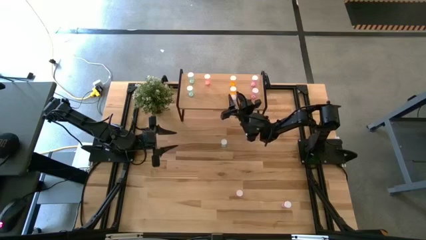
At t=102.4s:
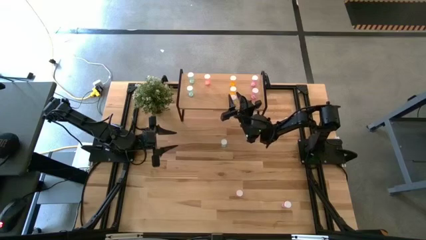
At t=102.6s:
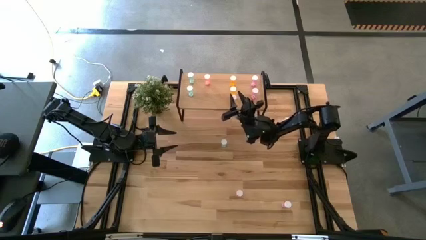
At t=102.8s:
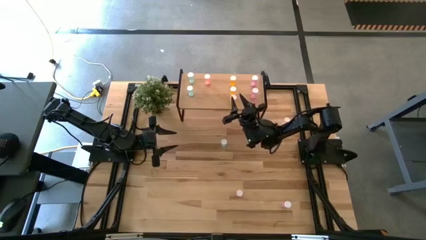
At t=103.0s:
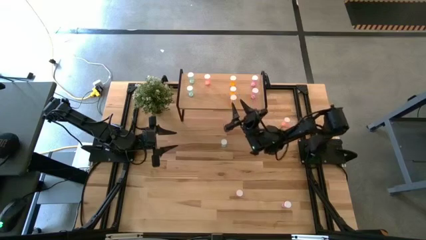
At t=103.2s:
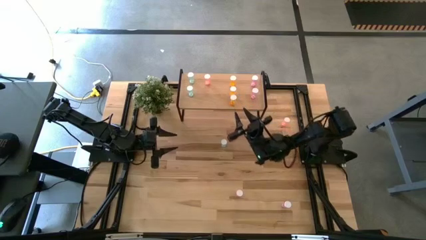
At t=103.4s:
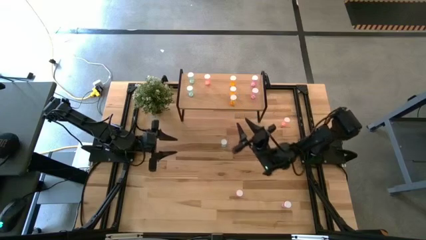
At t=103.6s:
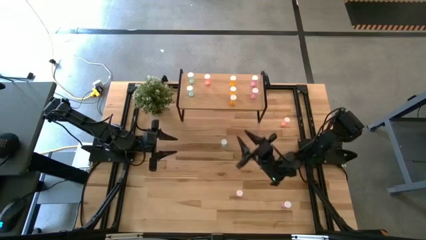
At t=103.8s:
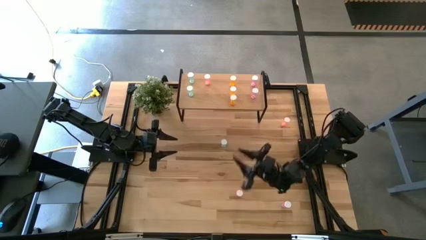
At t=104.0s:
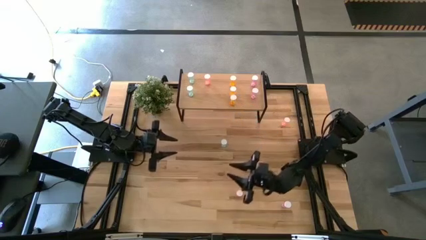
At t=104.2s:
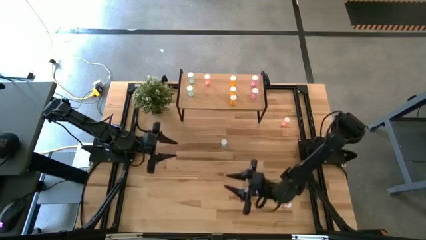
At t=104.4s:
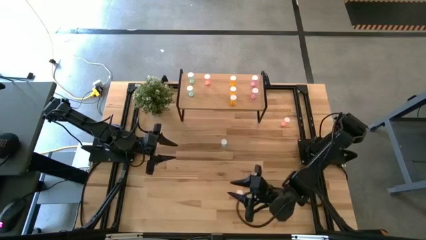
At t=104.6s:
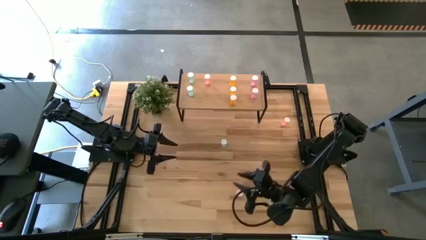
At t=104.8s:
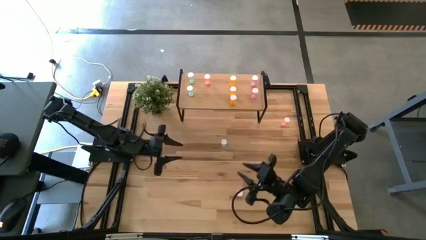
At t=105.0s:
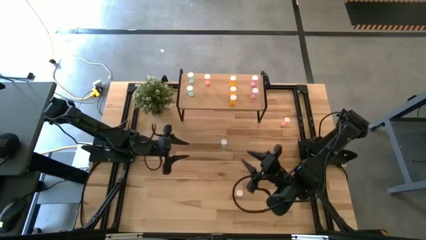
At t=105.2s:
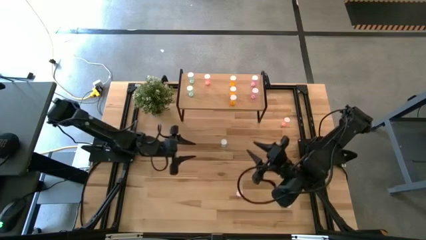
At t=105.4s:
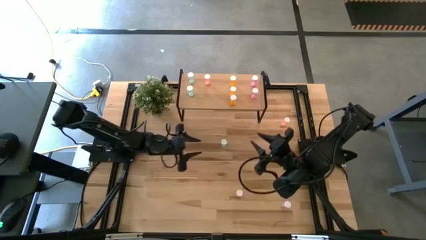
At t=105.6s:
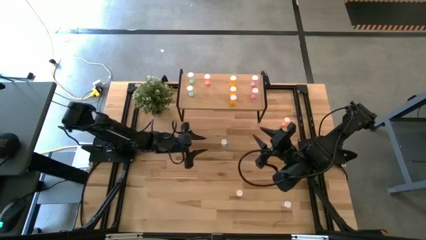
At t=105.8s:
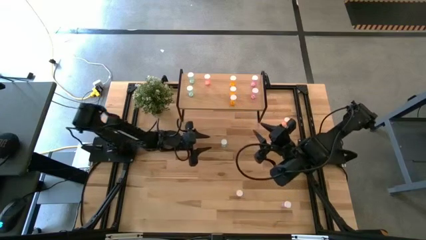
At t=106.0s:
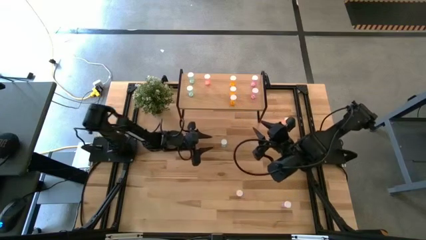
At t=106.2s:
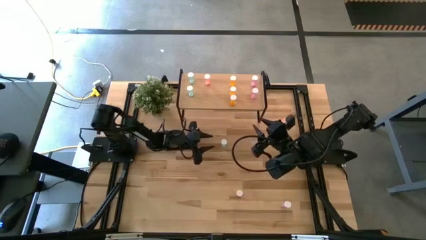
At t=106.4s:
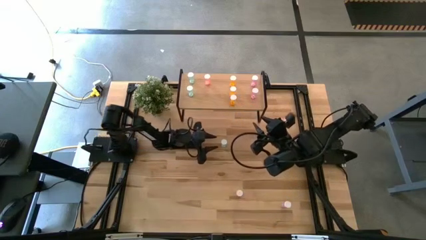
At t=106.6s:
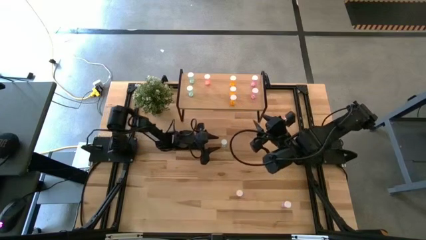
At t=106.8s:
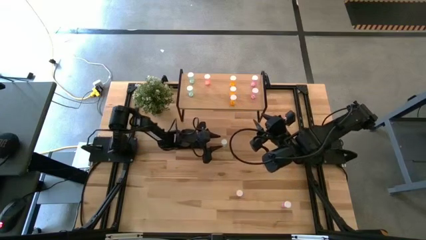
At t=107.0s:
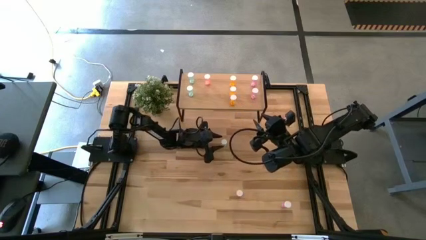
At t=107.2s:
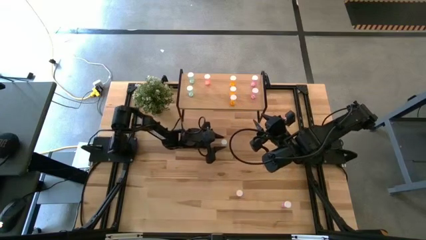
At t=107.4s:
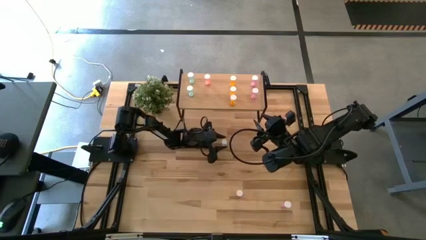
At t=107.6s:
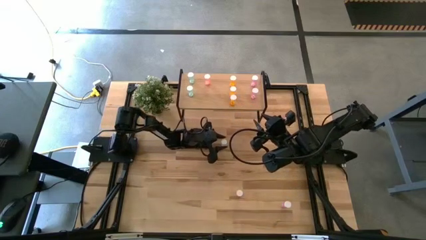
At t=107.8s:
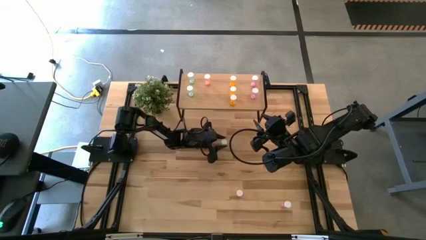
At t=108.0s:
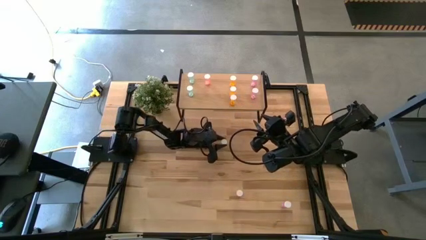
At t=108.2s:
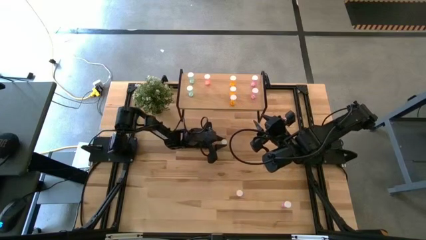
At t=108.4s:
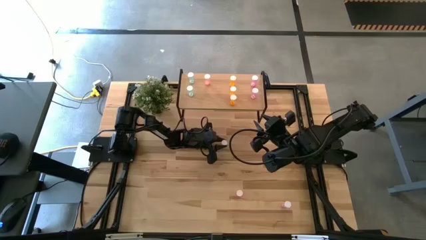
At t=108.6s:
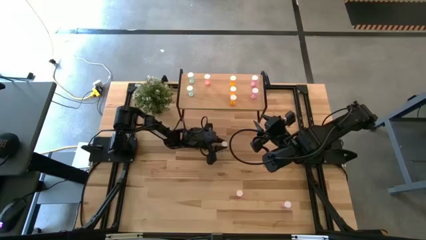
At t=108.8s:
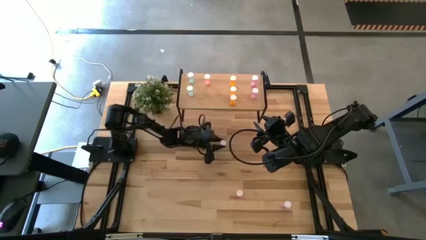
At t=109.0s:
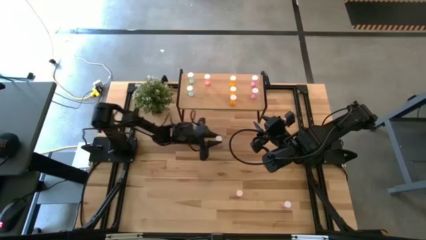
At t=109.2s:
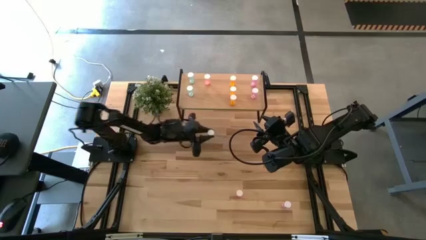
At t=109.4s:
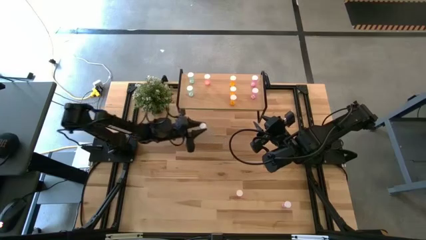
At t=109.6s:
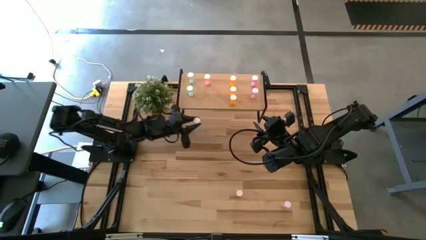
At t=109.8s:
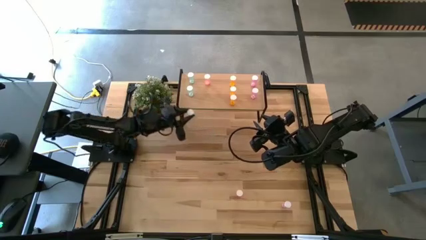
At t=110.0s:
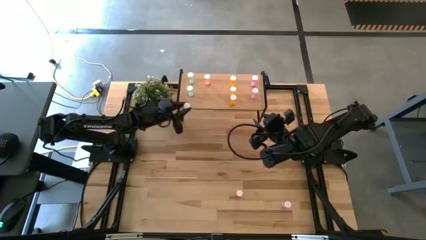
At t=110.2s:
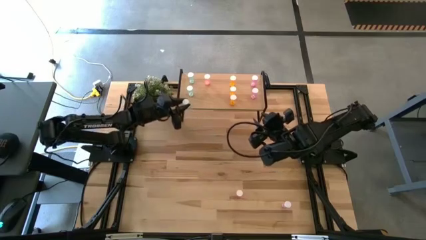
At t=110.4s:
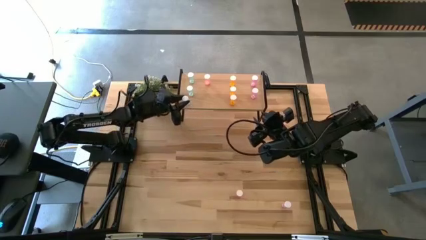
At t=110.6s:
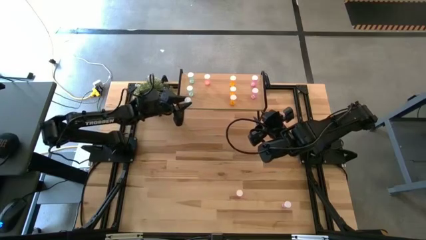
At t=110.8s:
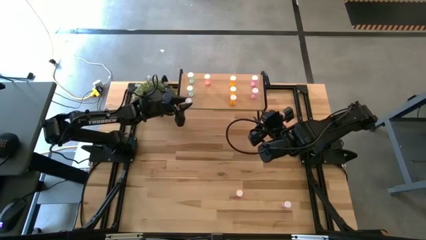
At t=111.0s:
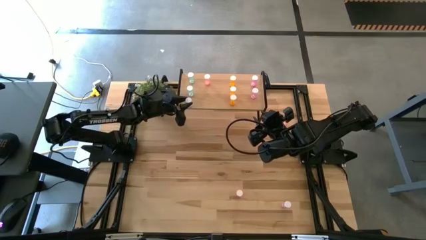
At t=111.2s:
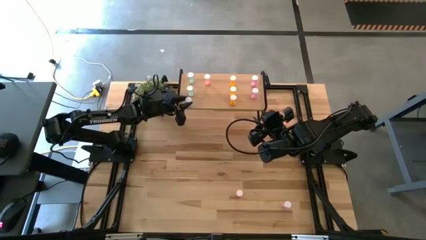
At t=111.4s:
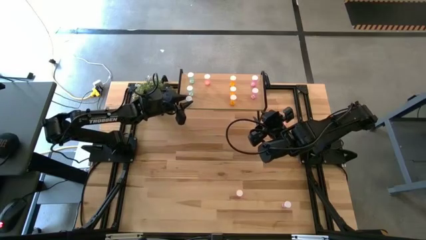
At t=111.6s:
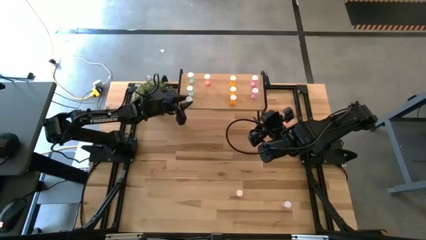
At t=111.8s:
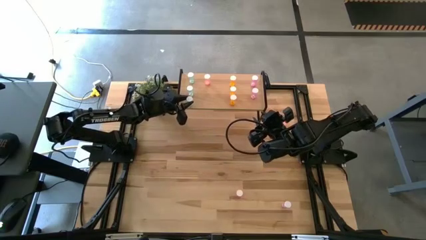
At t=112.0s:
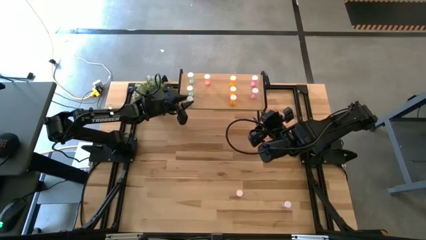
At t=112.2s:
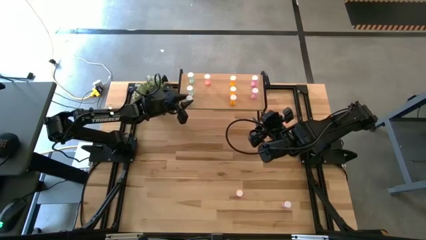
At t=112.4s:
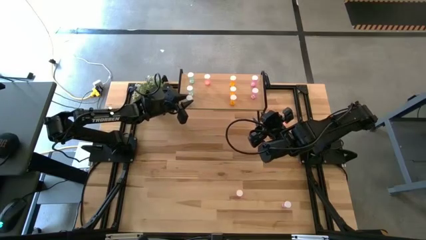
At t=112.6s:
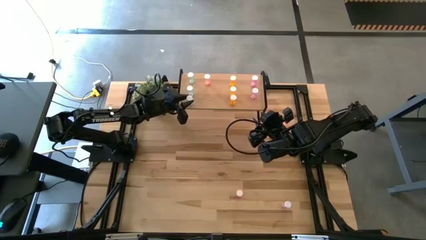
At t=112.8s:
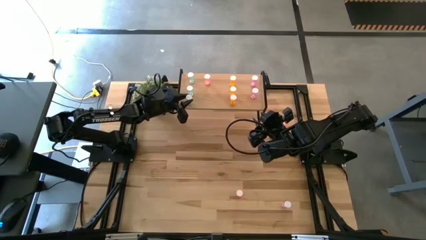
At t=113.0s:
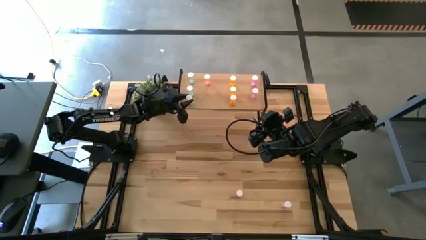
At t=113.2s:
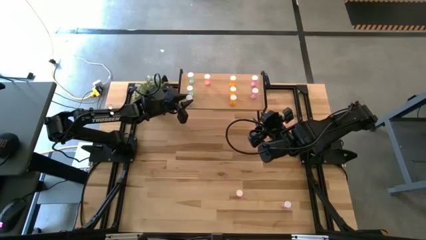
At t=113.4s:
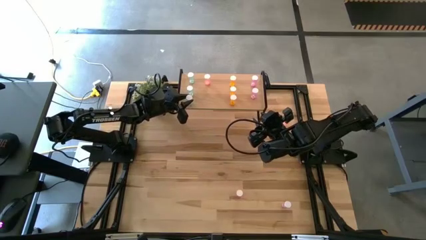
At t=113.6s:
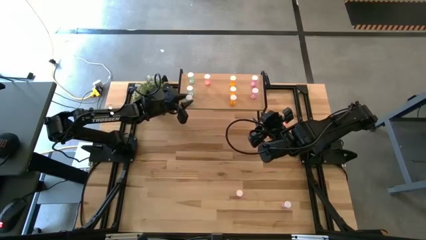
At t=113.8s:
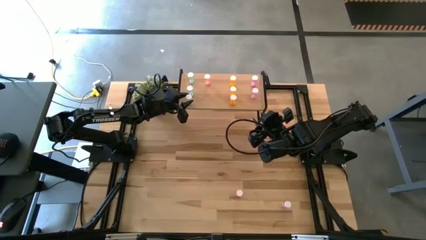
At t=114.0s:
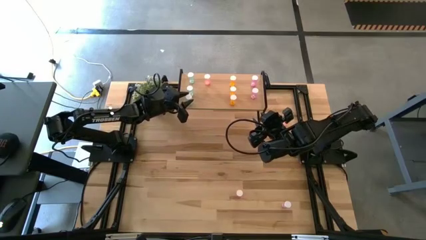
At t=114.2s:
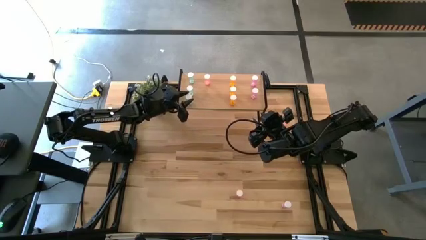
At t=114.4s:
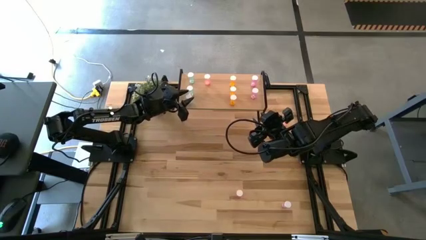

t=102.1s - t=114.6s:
Task: Pick and place medicine bottles onto shelf by color
Put the blue pill bottle on the shelf aligned with the other blue pill bottles
